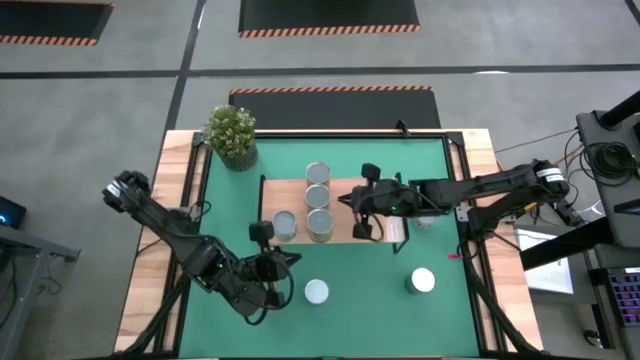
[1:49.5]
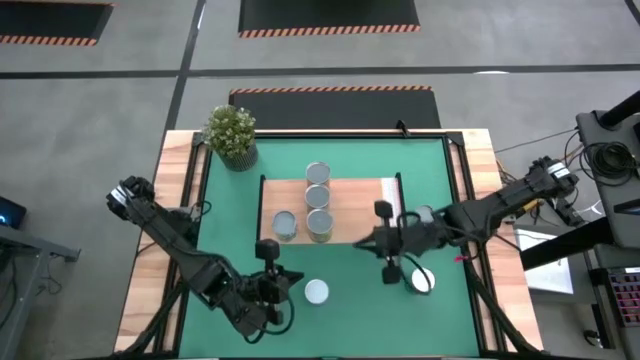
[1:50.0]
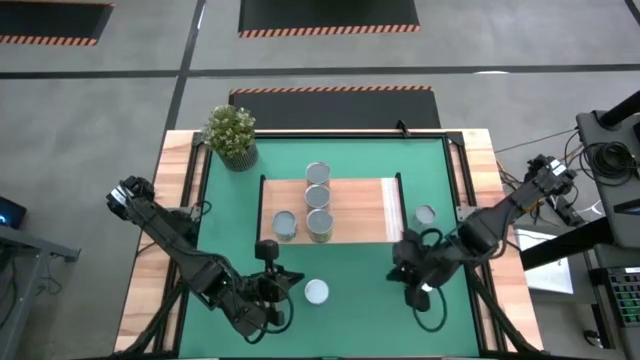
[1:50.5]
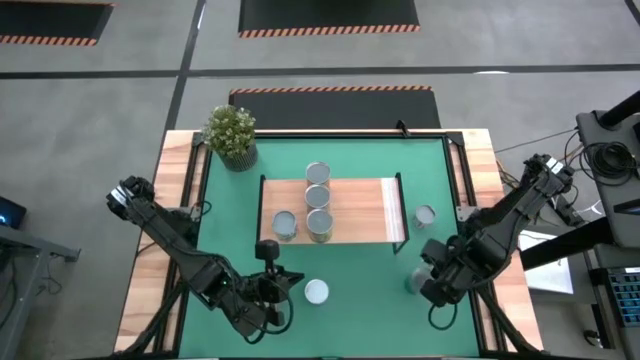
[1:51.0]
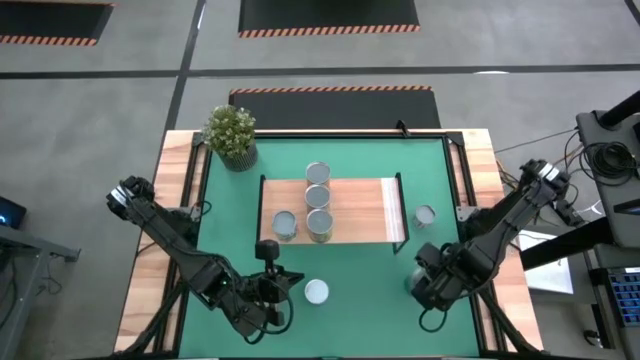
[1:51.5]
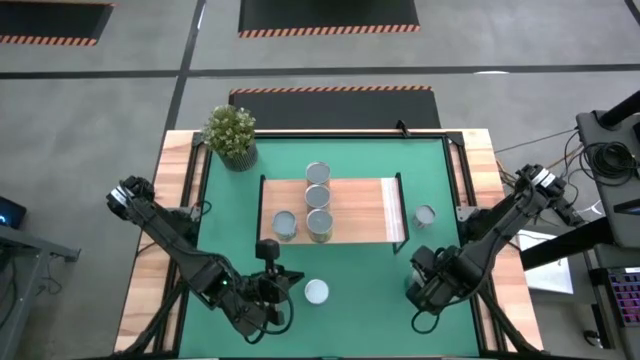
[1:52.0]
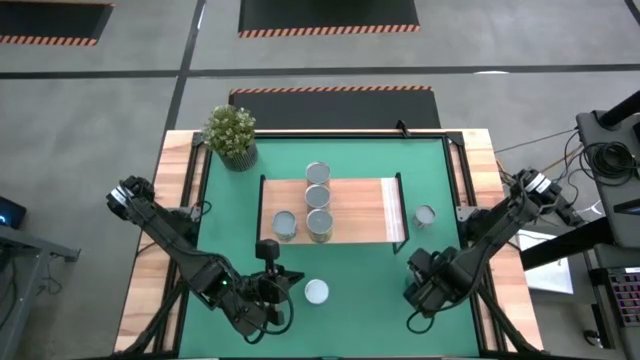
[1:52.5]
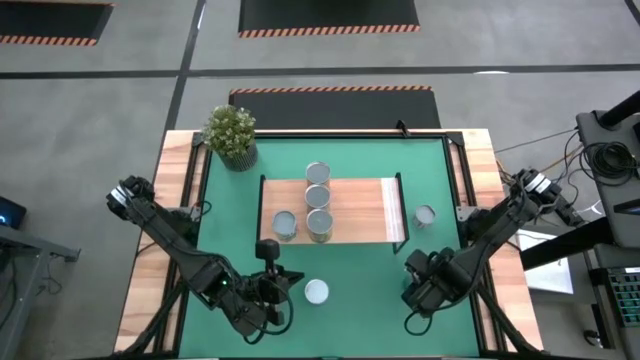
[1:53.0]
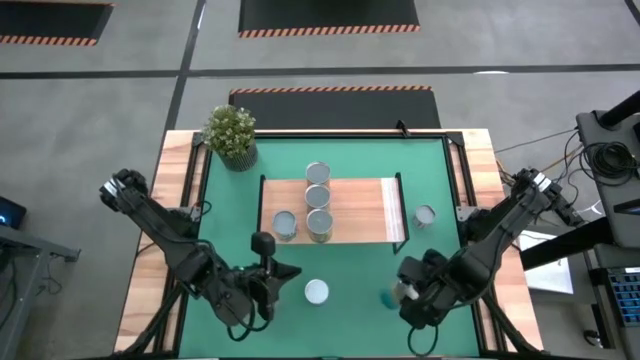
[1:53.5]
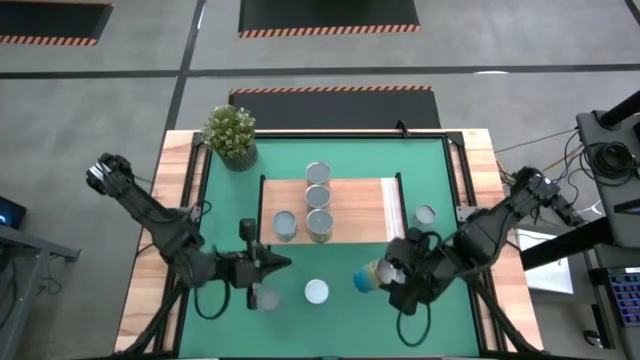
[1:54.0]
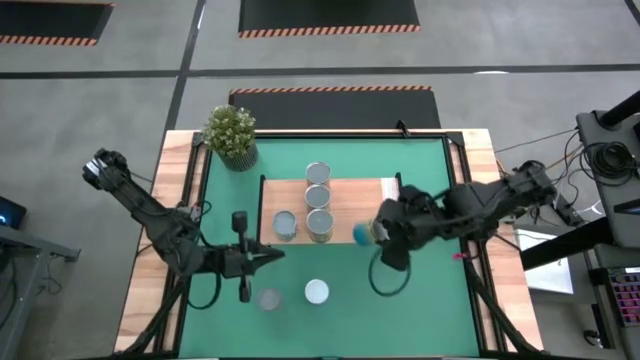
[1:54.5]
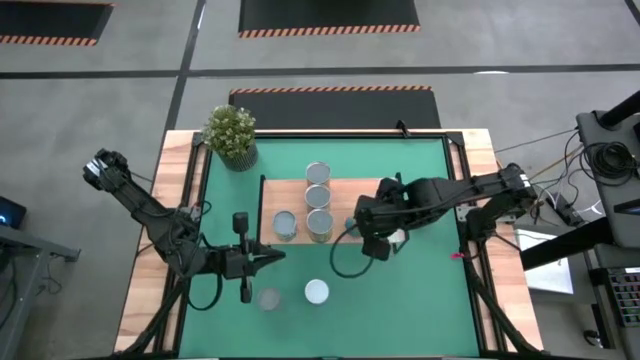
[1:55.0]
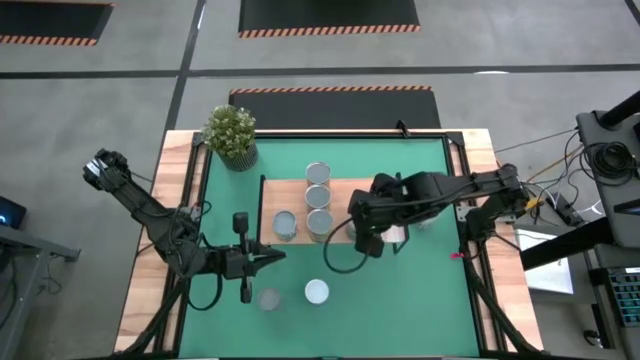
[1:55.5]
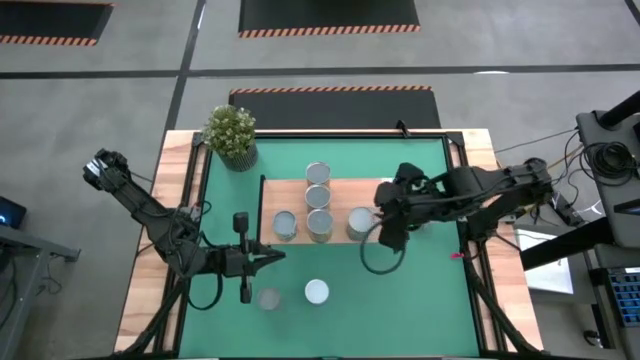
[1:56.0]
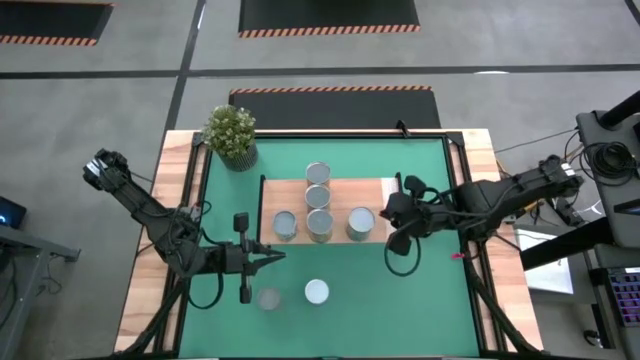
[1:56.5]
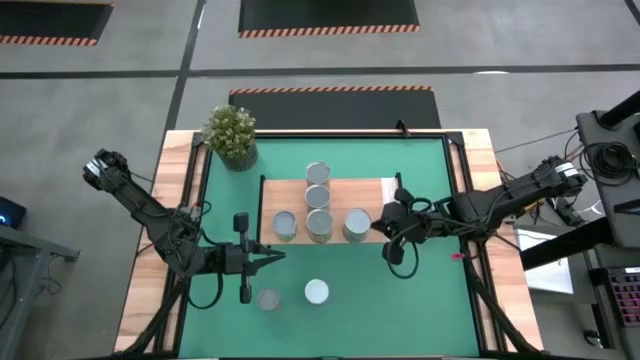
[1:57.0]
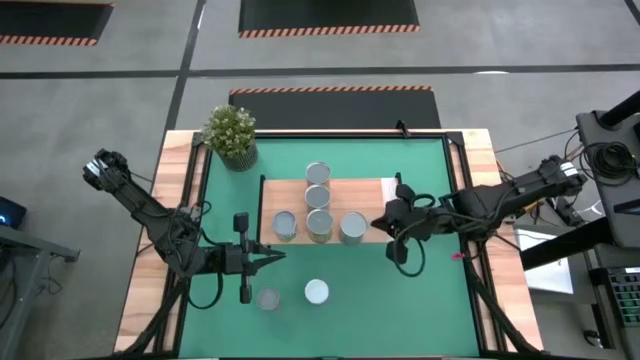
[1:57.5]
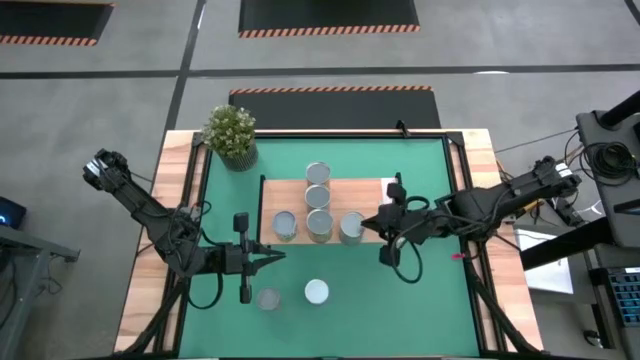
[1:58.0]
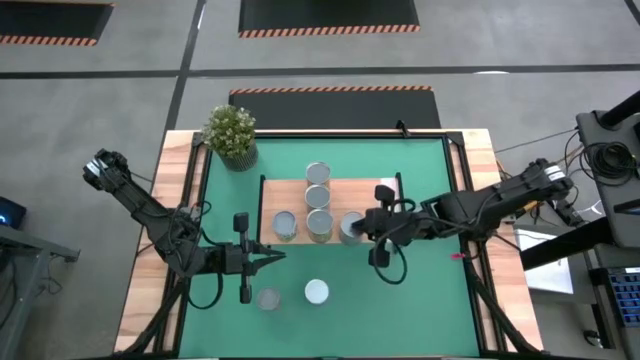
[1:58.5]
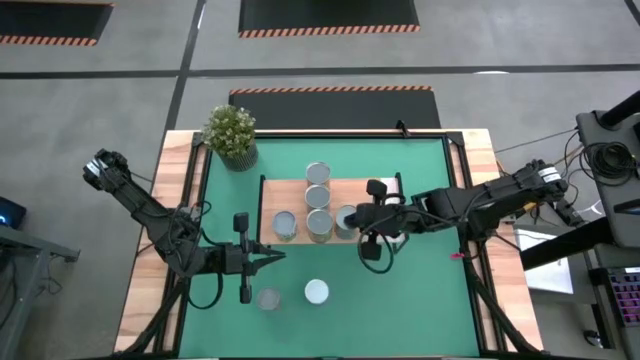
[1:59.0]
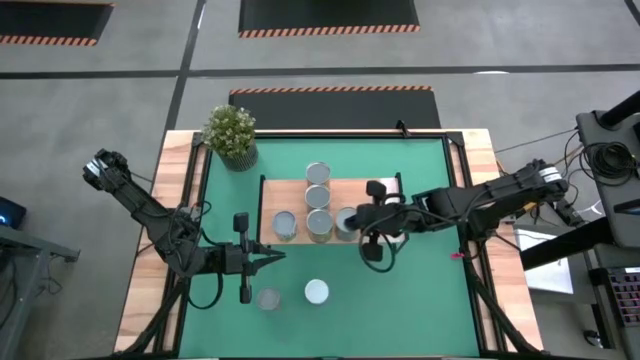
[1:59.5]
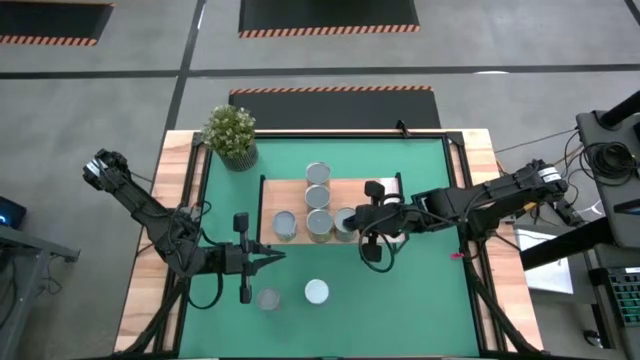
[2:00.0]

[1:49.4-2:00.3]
Task: Pick and place cans onto a shelf
Put the canned of cherries on the shelf

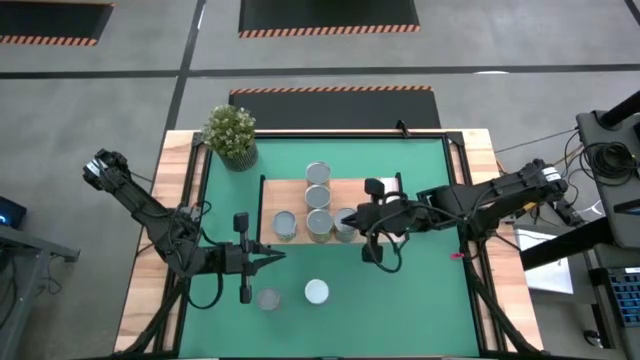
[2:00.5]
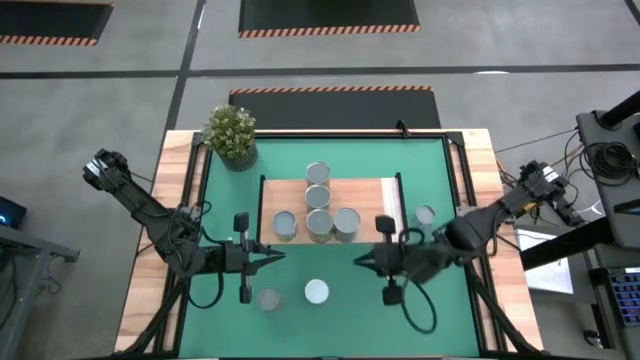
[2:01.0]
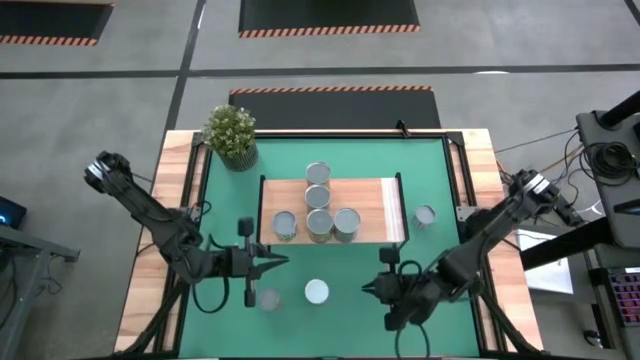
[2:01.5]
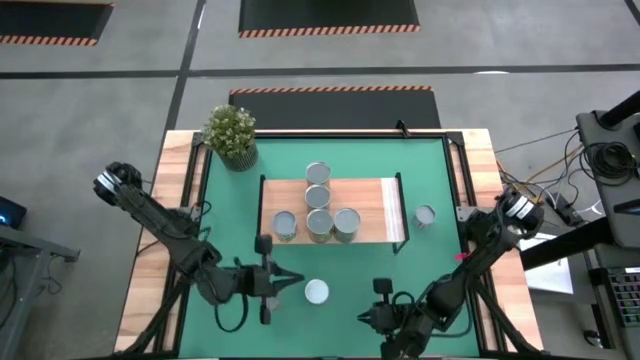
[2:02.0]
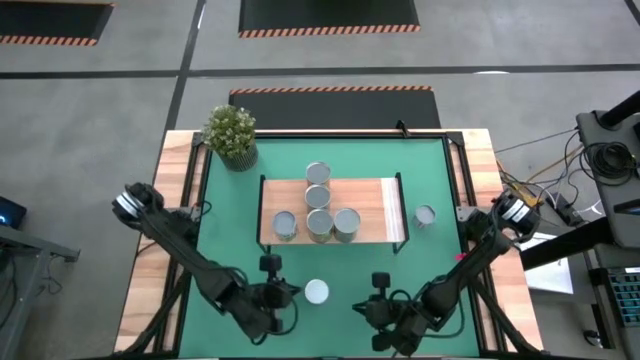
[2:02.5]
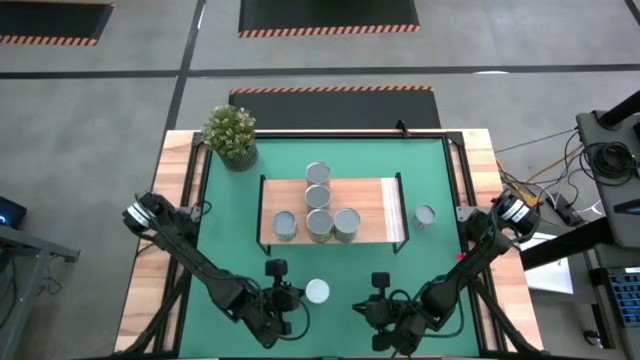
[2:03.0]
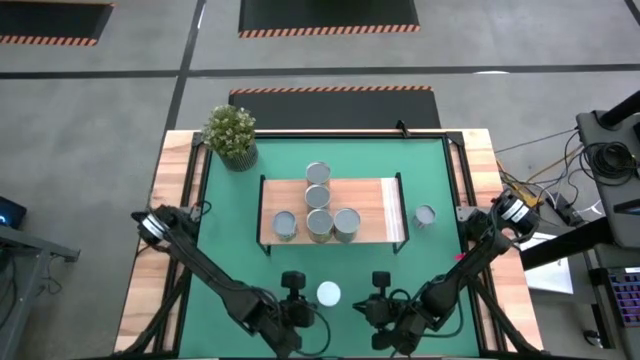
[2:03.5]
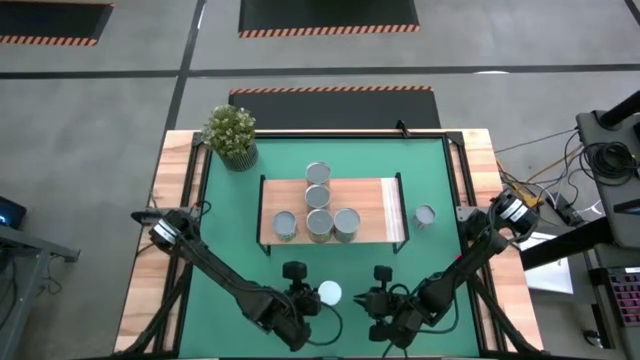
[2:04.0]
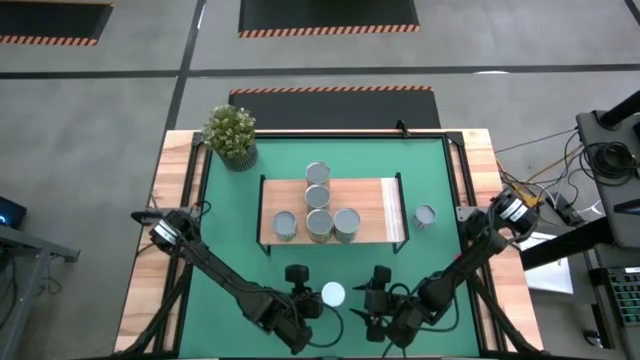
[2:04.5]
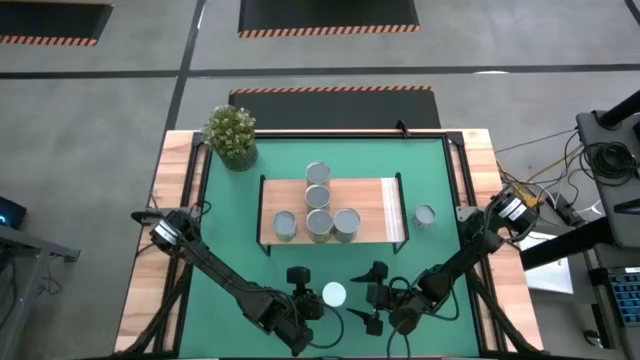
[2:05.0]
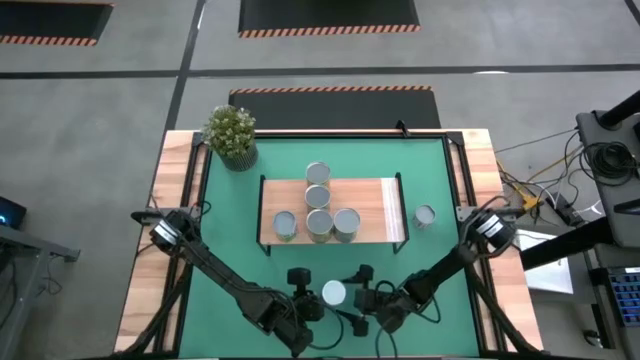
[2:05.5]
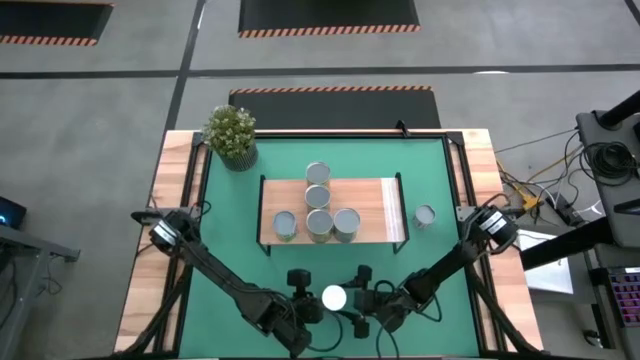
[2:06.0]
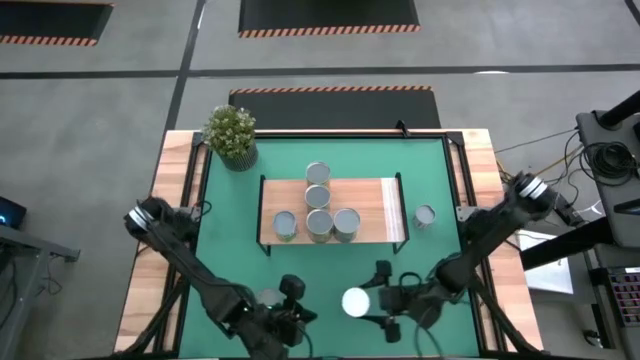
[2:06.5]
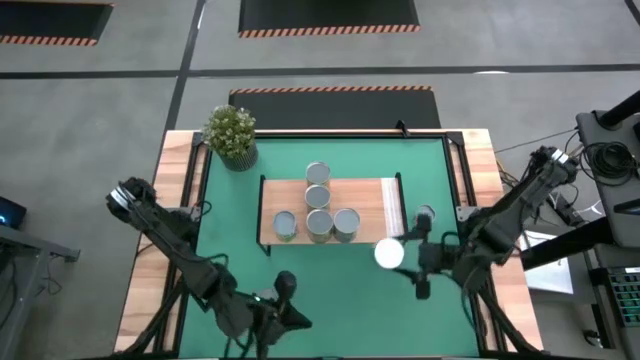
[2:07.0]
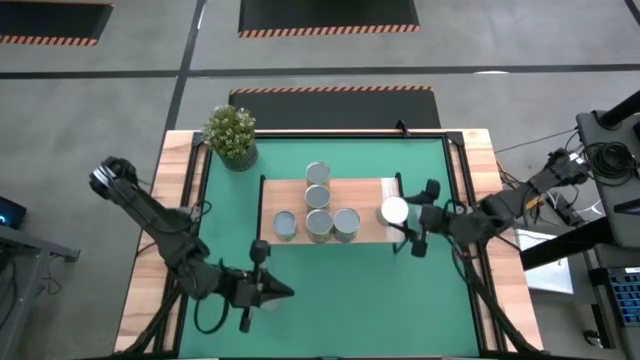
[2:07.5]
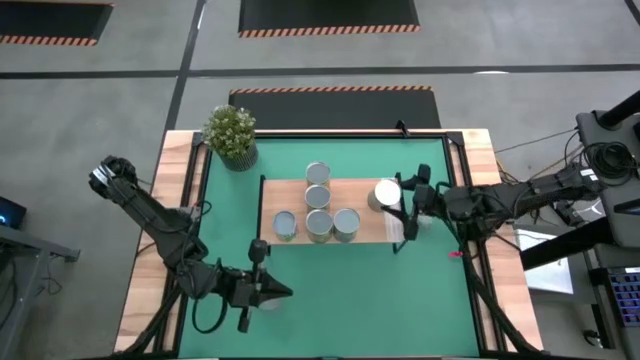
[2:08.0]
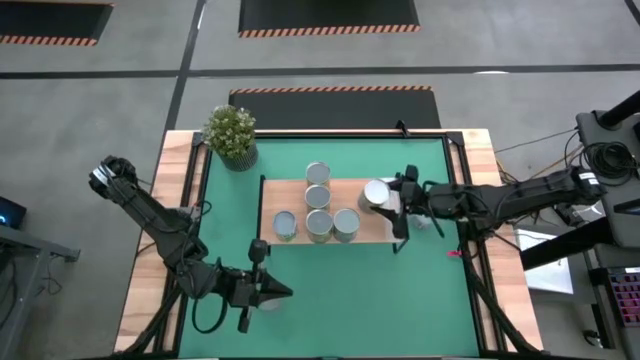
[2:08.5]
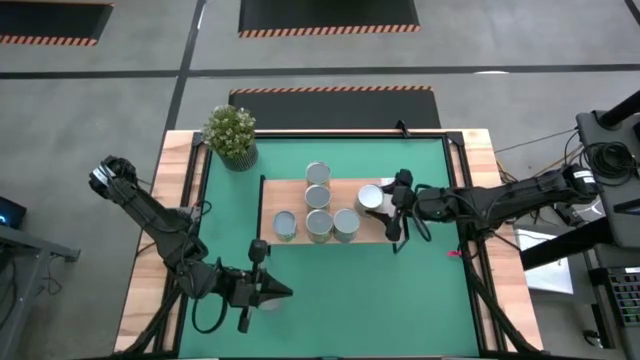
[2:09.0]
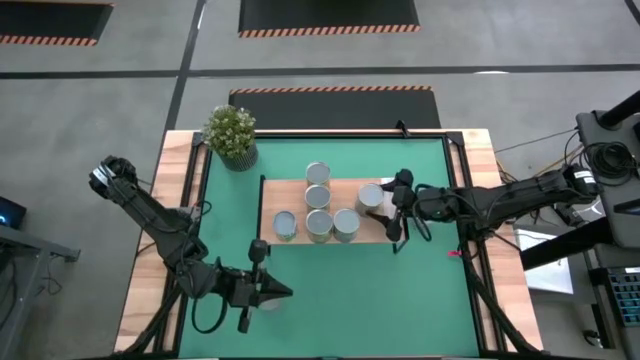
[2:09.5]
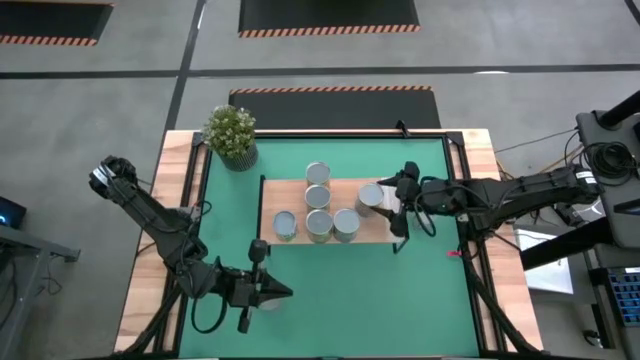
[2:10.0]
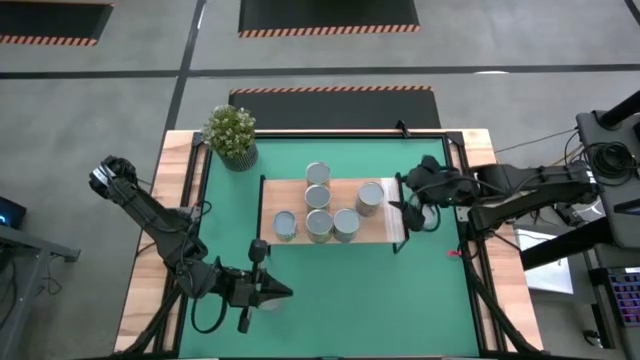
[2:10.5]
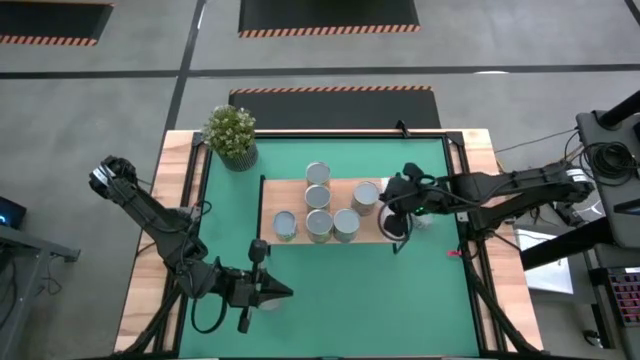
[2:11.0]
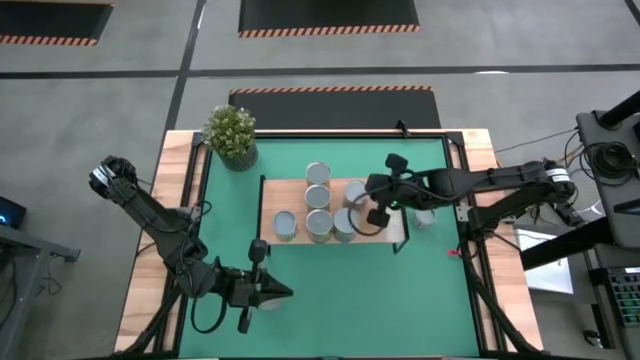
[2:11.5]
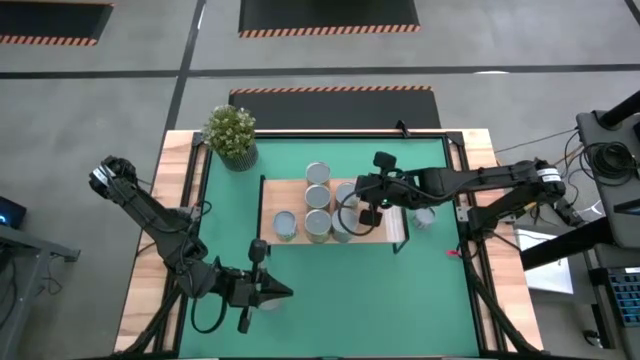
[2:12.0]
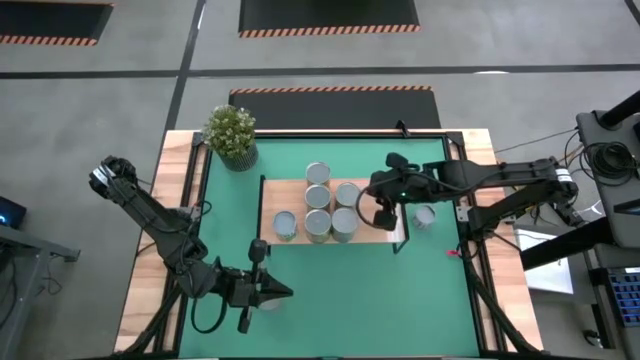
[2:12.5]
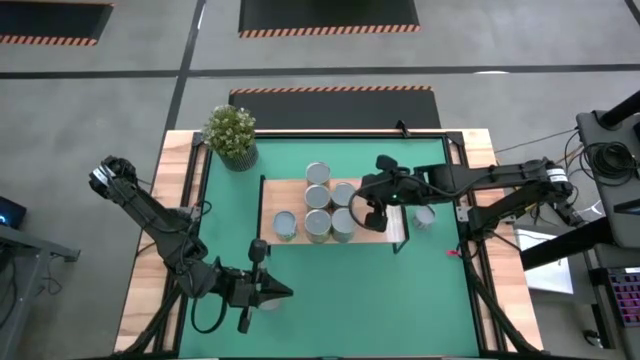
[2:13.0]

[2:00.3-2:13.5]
Put the canned of tomatoes on the shelf
